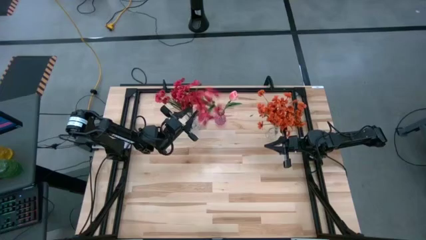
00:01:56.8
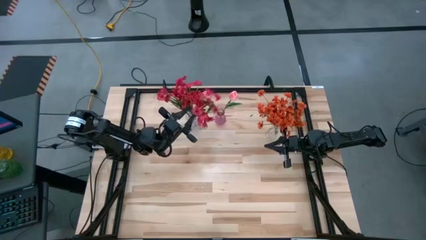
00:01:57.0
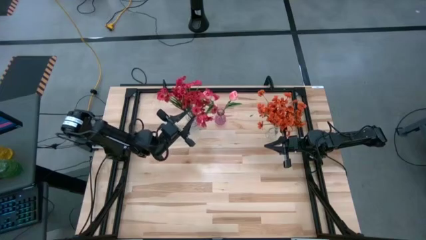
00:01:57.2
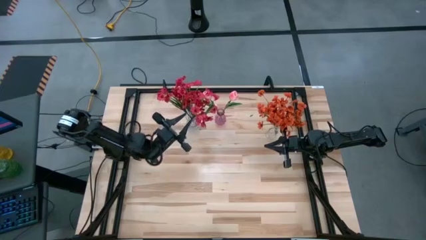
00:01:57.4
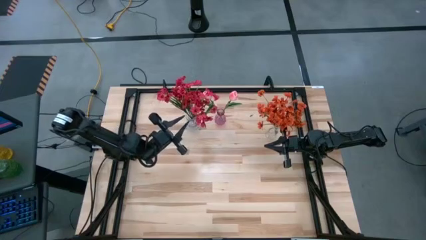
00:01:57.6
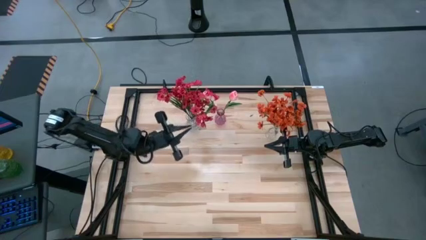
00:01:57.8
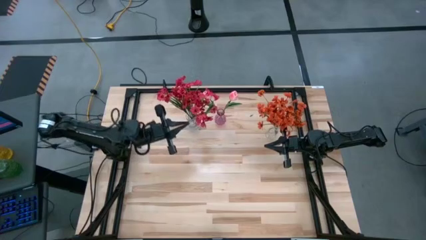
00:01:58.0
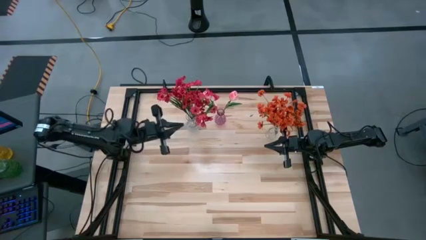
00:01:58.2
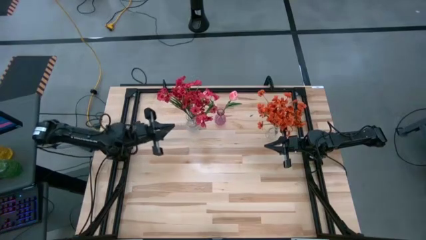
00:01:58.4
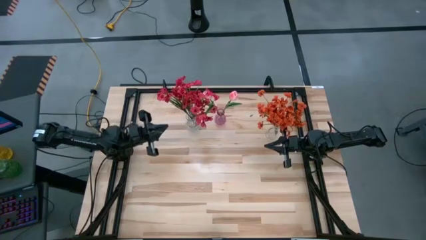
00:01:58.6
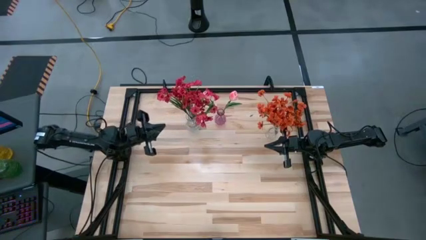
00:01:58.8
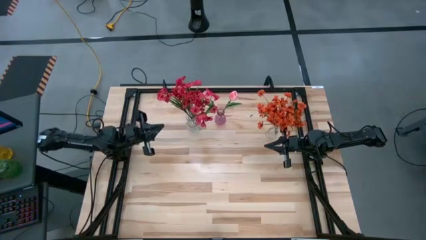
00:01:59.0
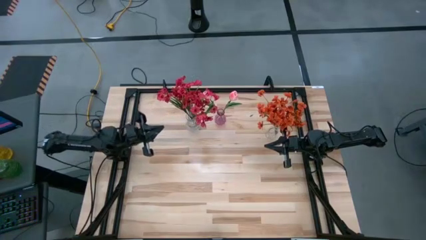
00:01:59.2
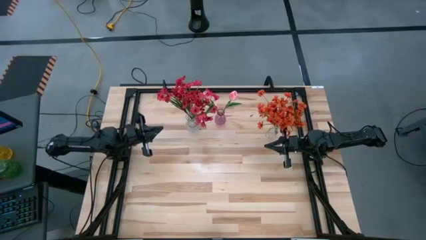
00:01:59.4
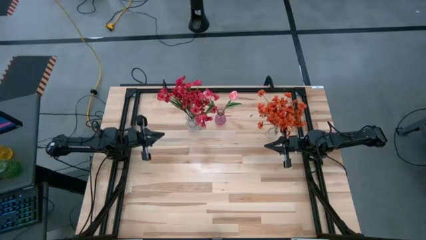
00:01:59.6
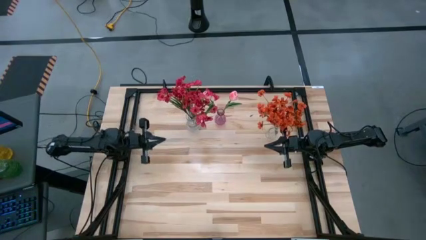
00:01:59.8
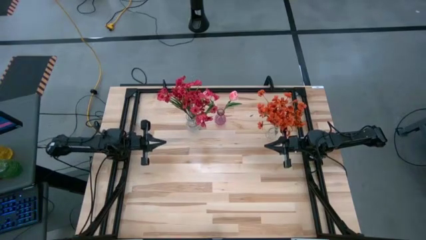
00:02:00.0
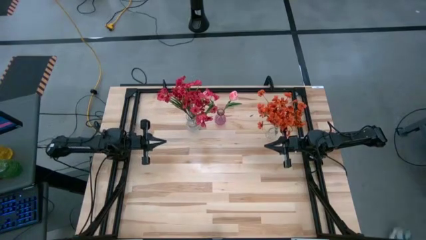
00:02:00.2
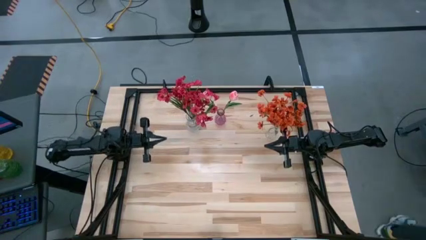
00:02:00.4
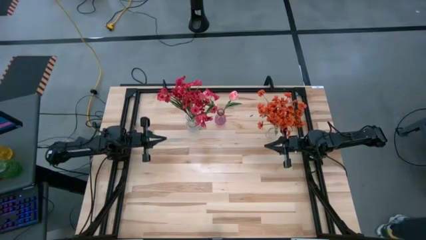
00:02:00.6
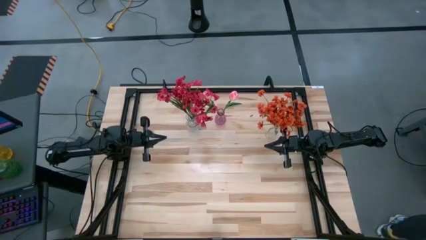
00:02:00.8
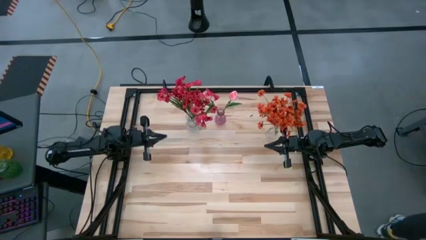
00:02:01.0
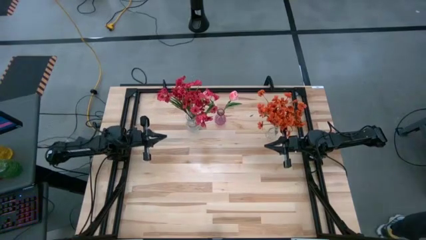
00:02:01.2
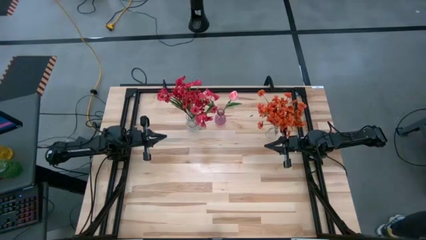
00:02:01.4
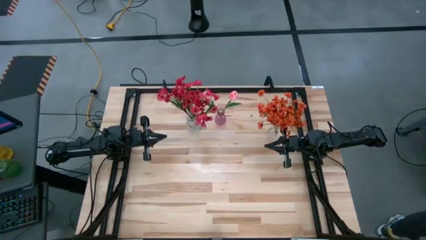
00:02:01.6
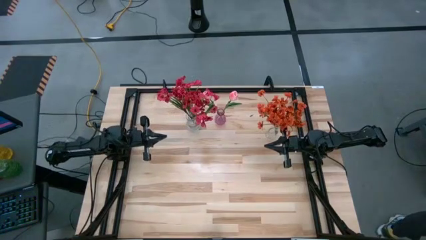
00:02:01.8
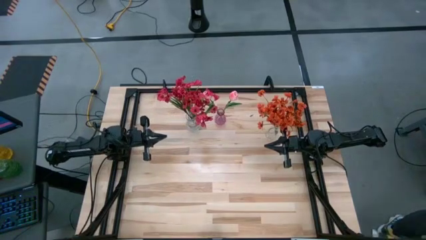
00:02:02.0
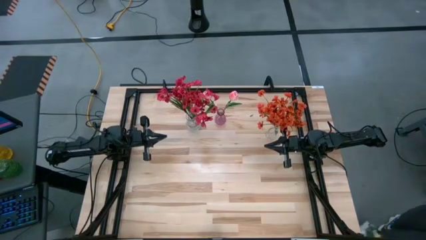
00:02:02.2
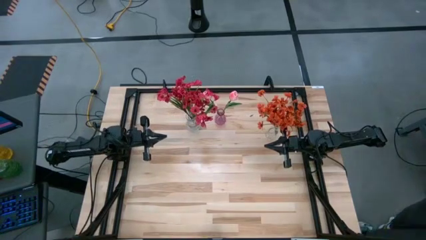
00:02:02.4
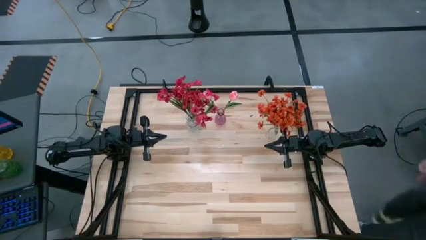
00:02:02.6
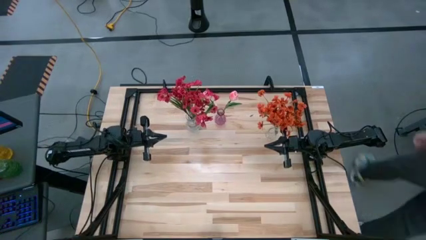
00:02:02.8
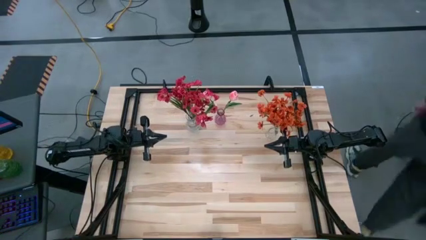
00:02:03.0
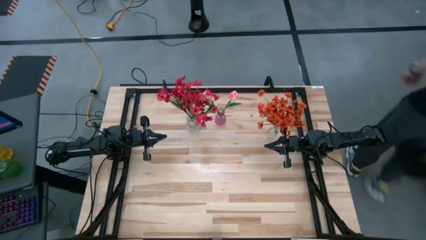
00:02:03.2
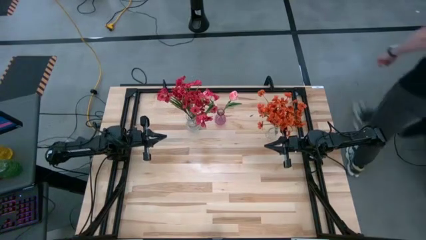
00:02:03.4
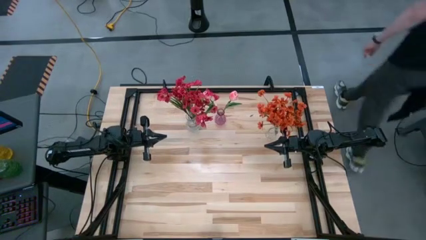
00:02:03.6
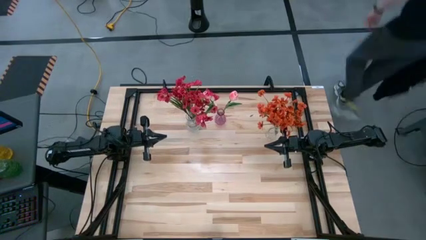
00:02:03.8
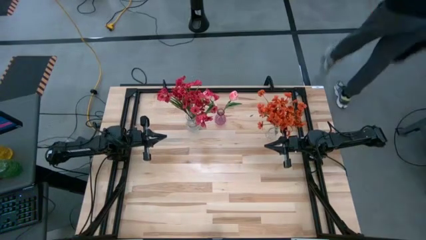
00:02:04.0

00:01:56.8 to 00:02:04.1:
Task: Sort flowers into vase by color
Return to Home Position

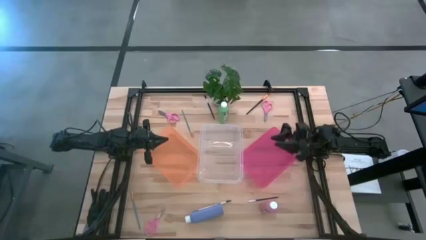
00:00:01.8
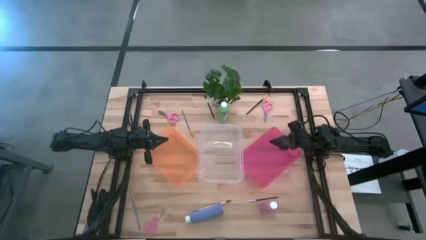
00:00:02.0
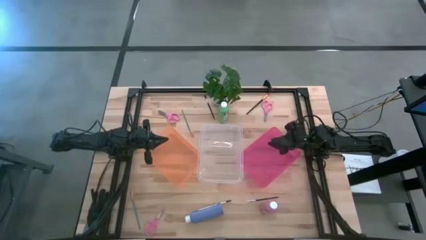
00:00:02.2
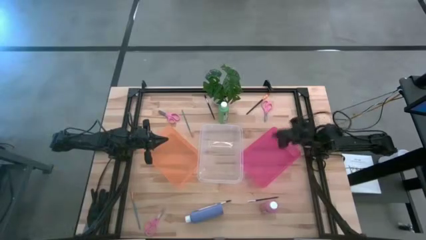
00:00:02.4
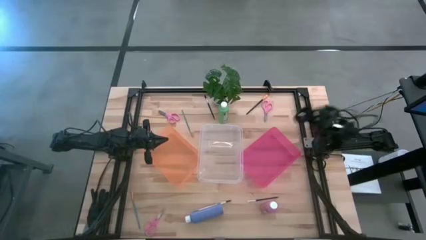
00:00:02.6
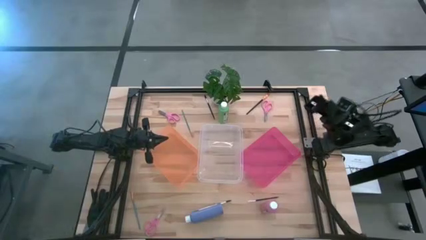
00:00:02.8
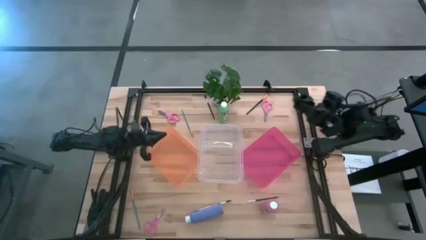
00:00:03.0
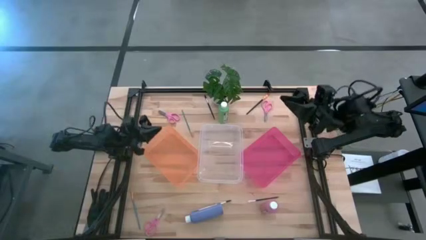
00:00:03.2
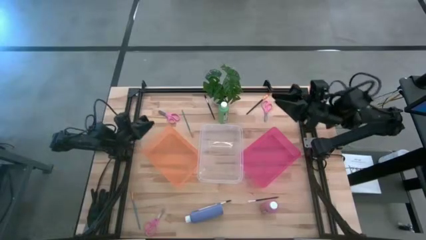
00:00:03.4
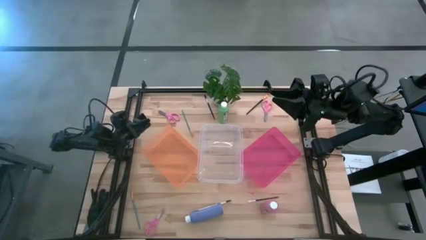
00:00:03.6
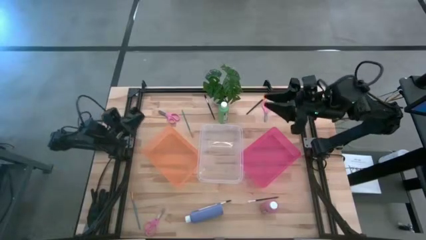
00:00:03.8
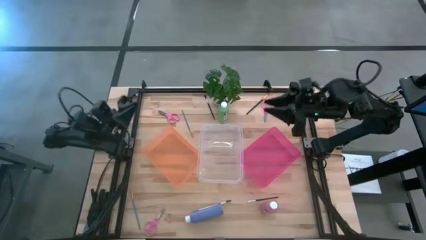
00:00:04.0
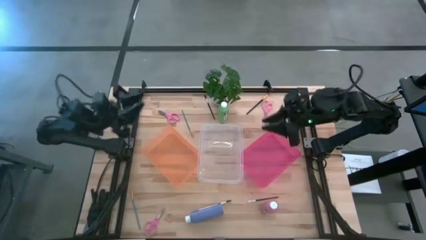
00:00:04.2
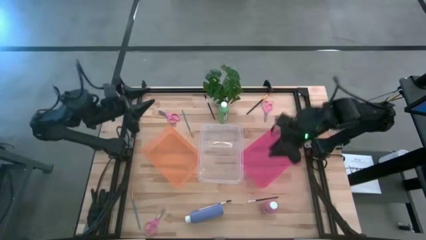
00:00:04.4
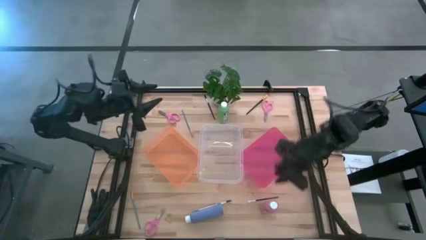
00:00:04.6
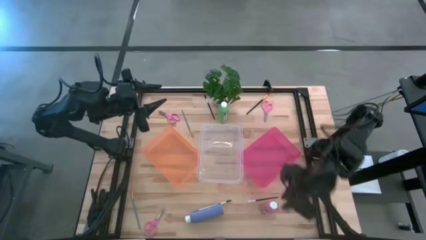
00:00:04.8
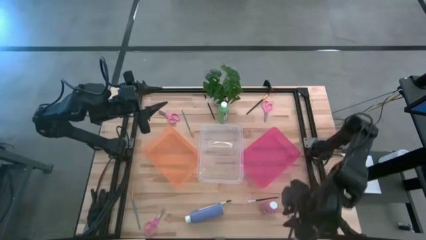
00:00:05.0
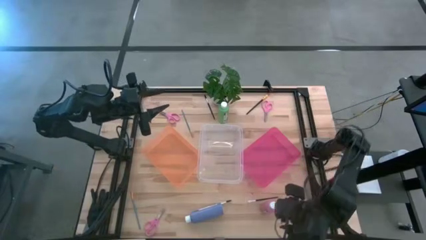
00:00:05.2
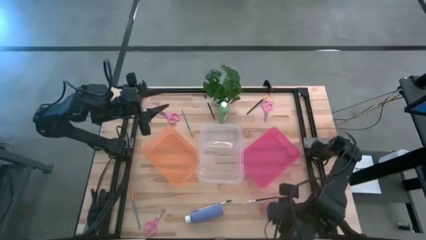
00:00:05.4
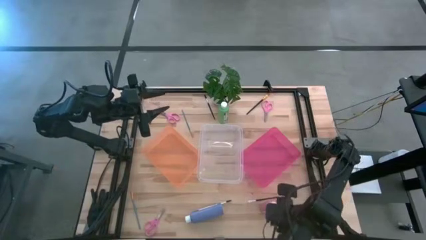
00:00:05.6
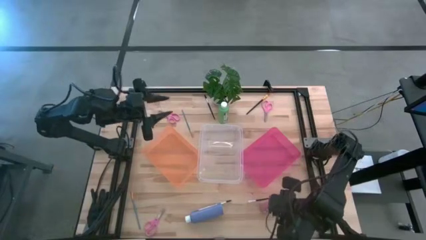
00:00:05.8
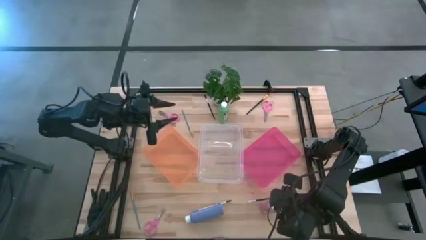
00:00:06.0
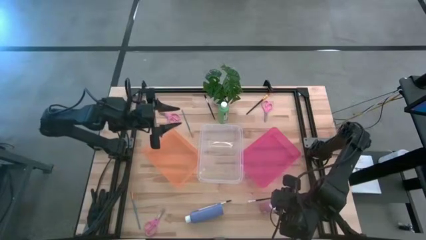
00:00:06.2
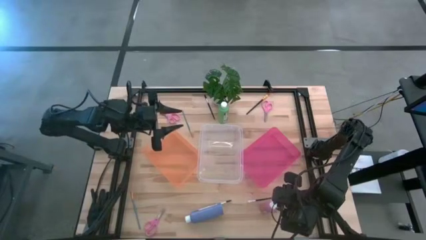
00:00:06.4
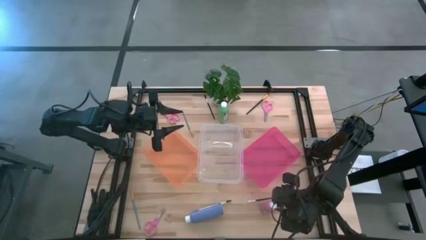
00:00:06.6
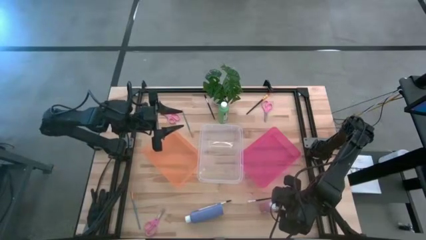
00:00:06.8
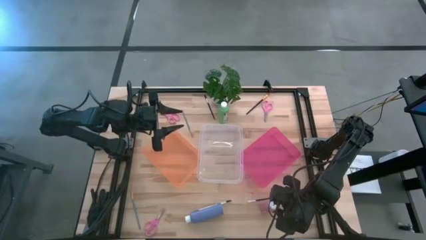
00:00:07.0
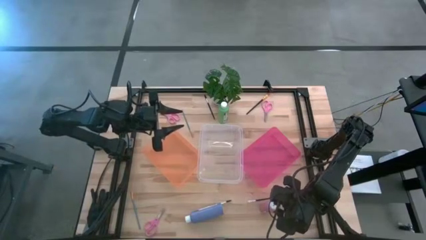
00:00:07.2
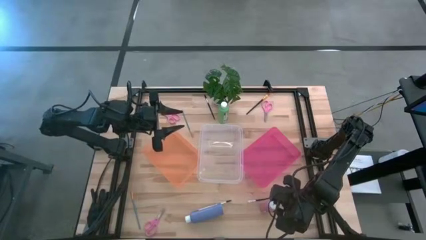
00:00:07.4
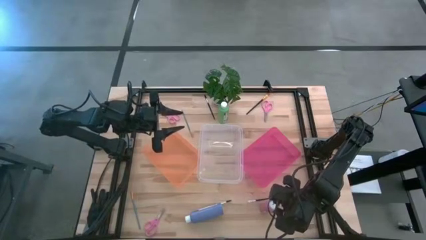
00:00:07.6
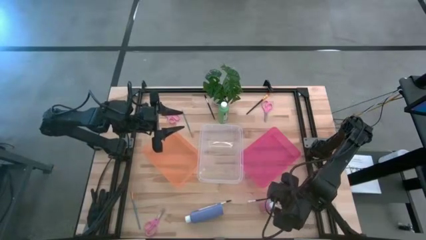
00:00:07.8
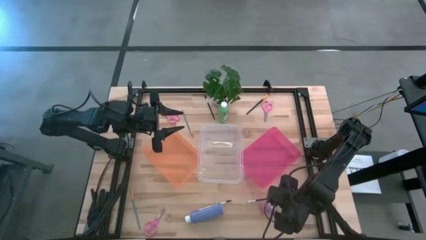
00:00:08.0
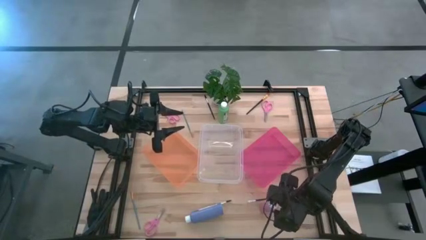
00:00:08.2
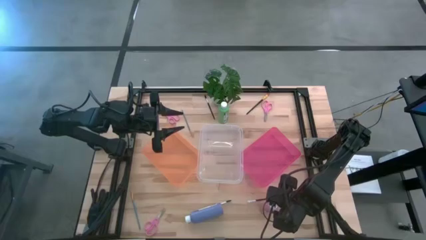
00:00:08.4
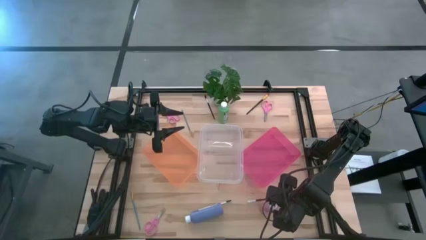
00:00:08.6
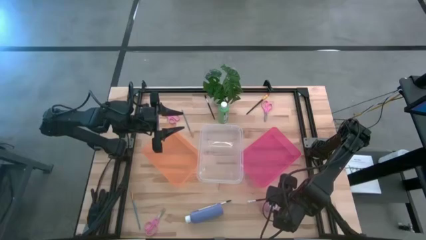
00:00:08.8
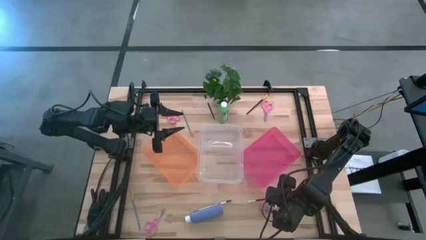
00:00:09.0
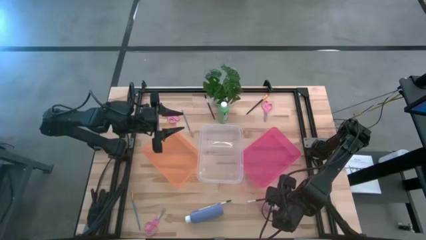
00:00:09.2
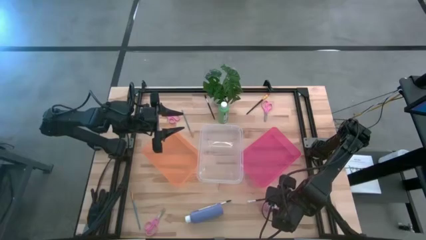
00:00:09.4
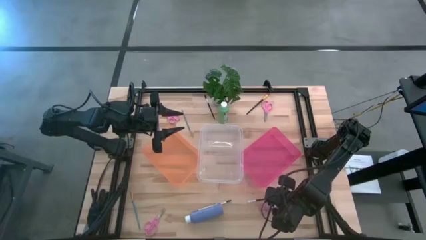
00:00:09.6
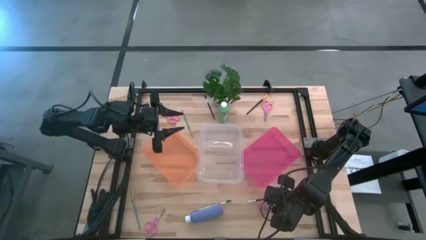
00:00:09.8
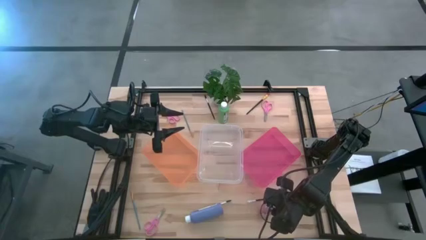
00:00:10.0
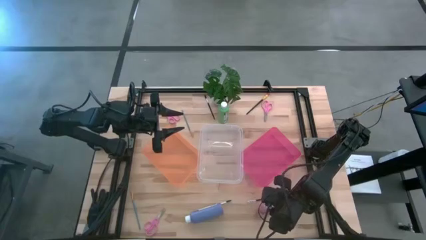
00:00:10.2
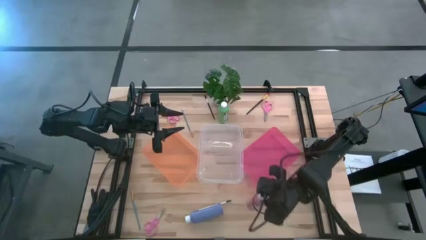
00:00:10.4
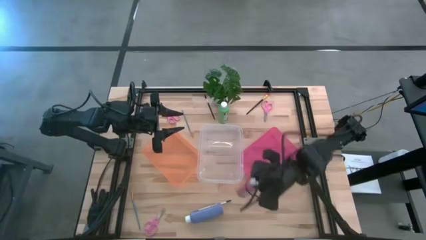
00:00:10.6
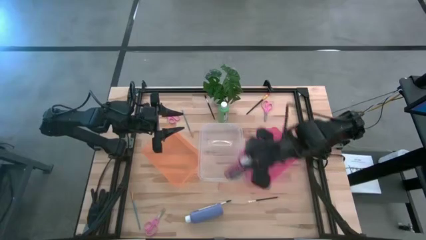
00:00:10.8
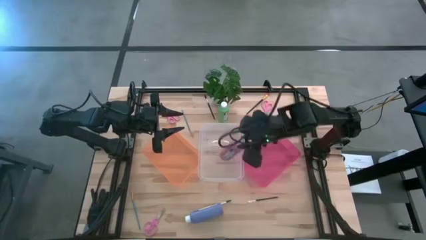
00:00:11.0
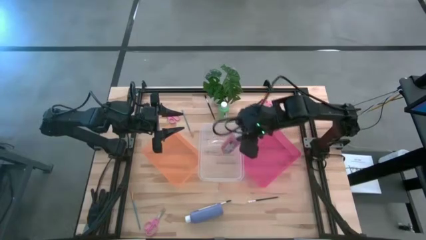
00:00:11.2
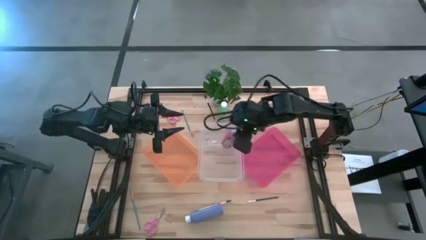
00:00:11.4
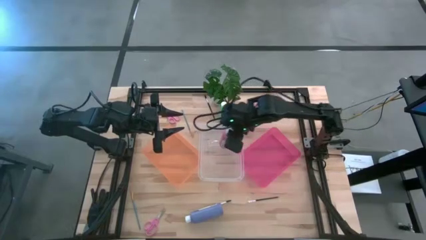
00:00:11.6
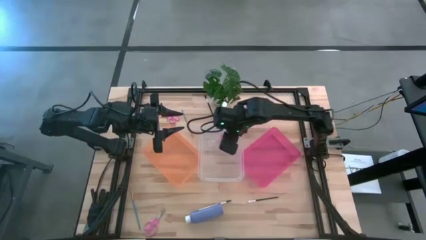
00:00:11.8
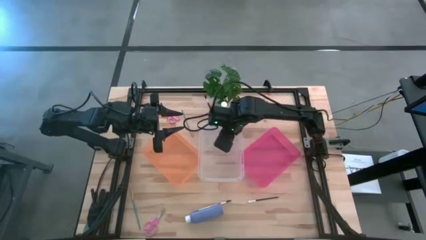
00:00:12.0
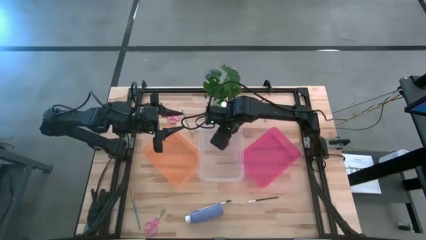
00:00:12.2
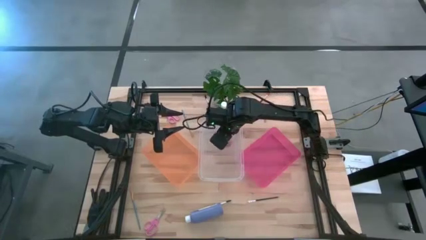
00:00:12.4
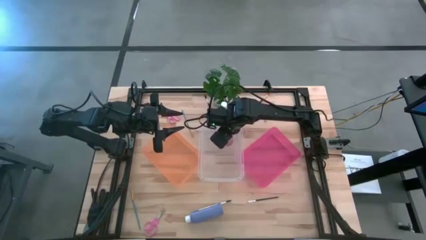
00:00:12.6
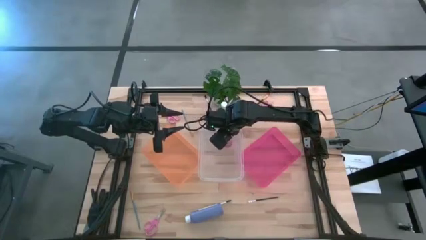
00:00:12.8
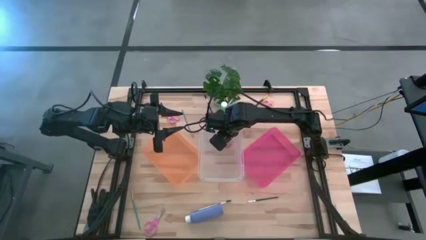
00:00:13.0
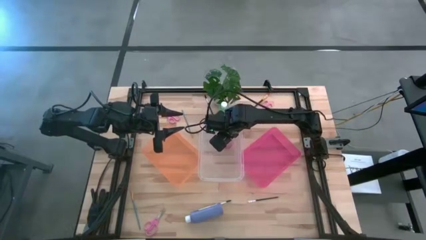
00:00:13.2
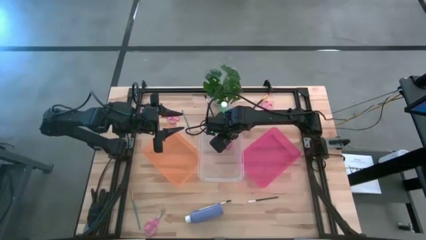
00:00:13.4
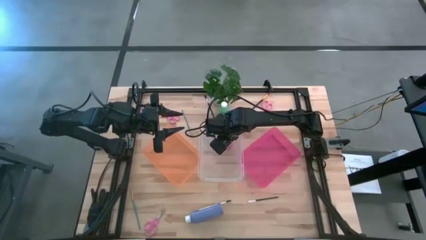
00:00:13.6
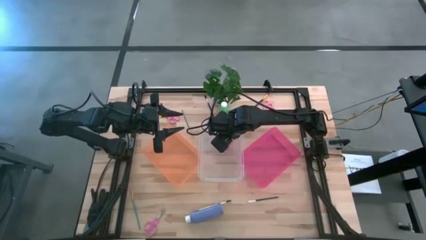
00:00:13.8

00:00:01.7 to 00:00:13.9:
Task: Pick & Place Paint Supplies
Put the pink paint bottle into the transparent bin
